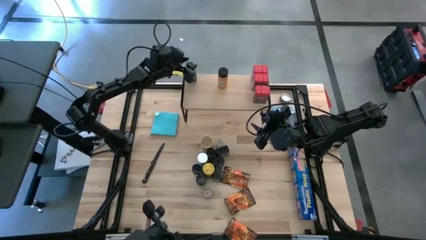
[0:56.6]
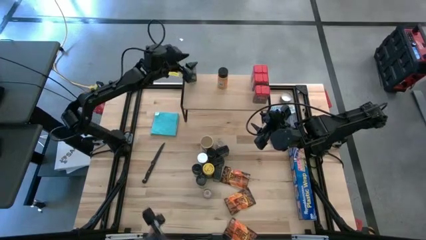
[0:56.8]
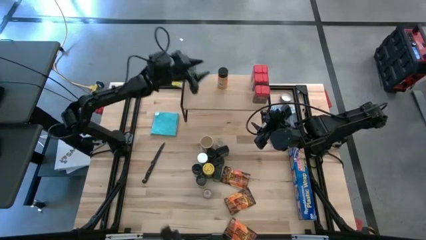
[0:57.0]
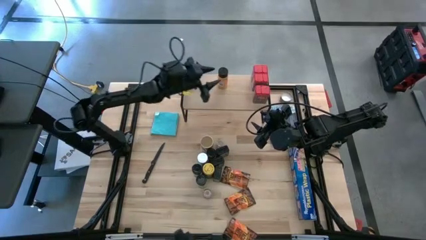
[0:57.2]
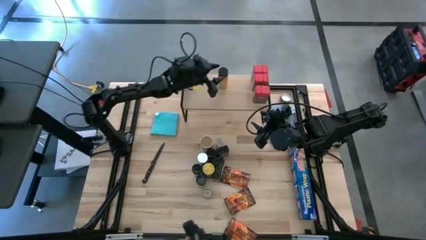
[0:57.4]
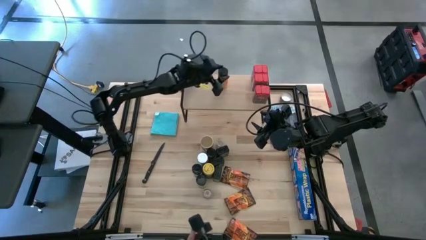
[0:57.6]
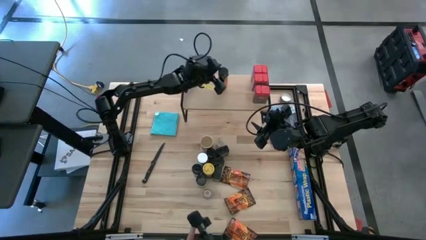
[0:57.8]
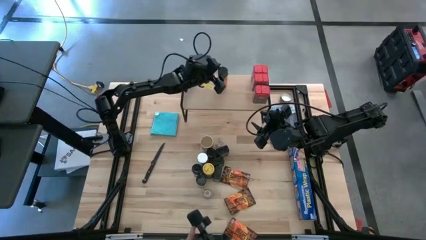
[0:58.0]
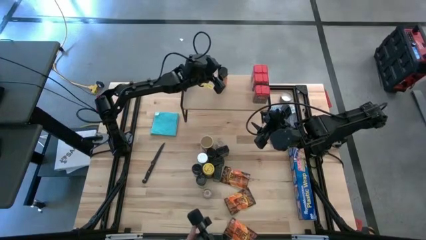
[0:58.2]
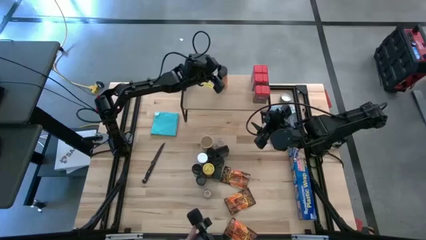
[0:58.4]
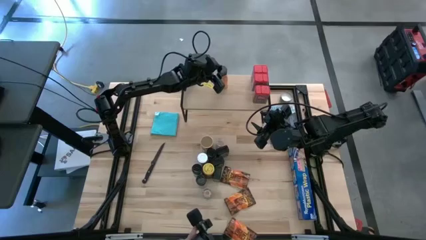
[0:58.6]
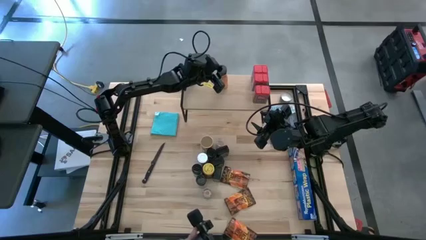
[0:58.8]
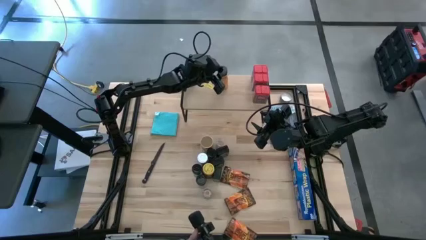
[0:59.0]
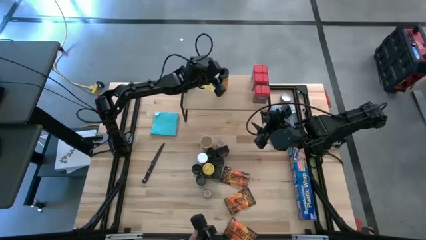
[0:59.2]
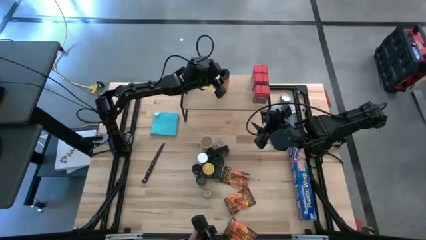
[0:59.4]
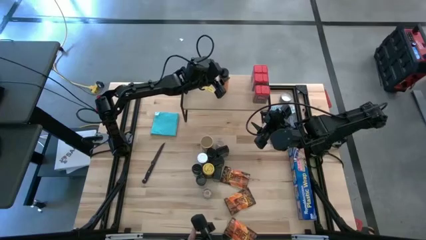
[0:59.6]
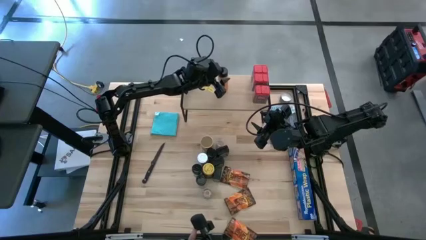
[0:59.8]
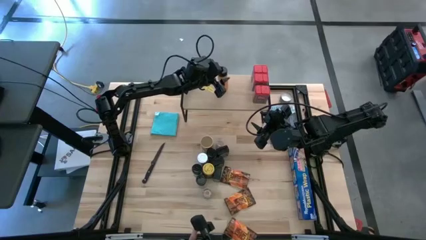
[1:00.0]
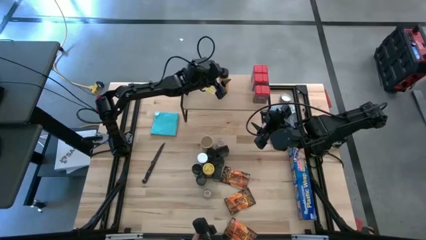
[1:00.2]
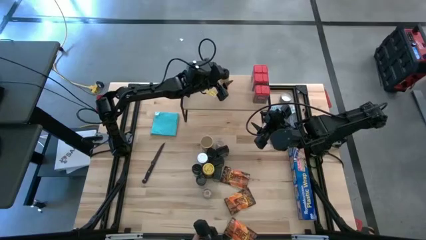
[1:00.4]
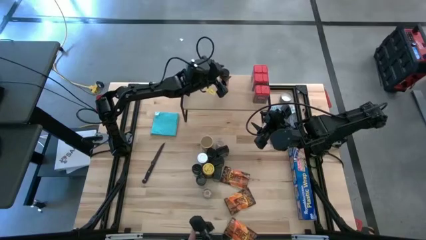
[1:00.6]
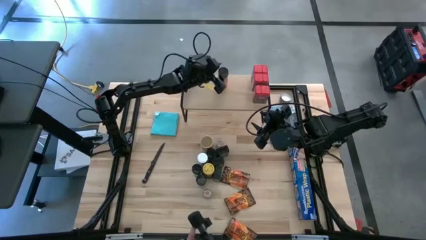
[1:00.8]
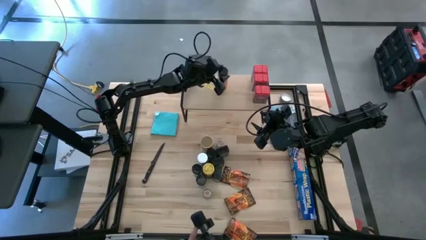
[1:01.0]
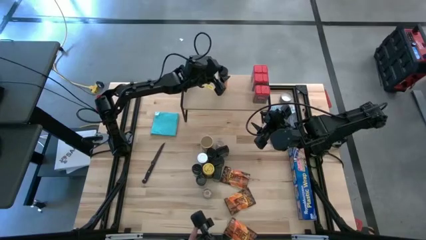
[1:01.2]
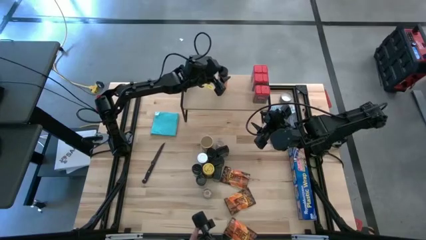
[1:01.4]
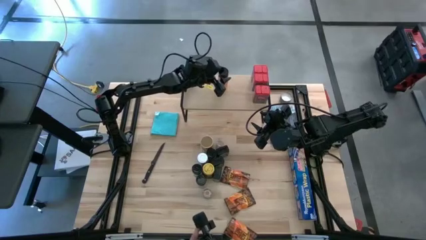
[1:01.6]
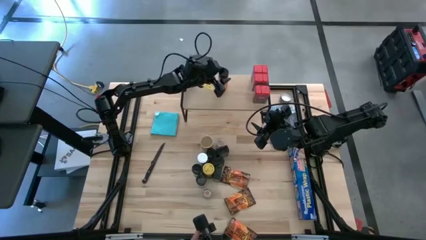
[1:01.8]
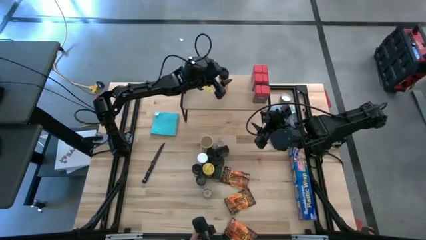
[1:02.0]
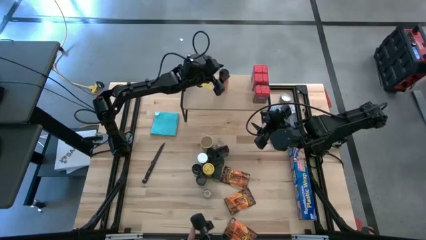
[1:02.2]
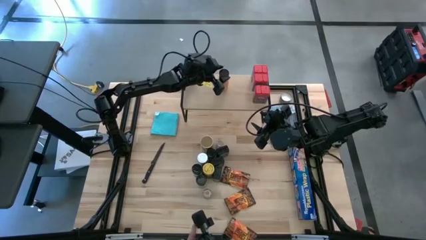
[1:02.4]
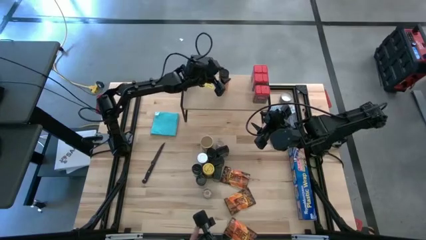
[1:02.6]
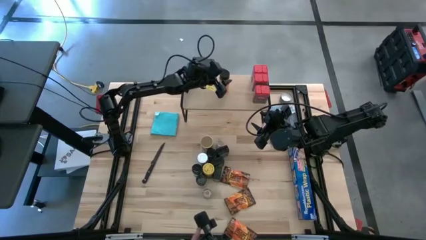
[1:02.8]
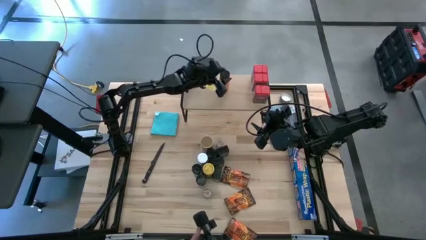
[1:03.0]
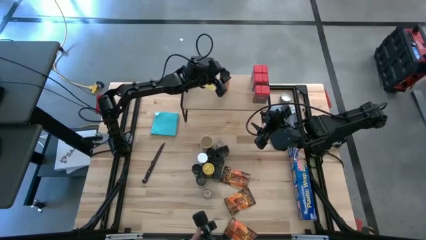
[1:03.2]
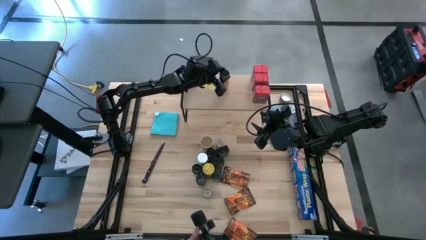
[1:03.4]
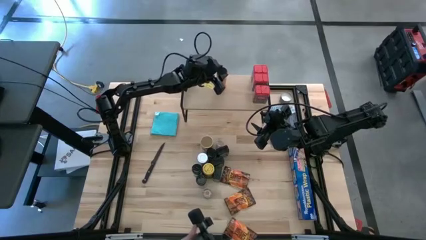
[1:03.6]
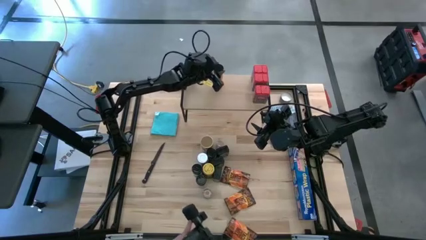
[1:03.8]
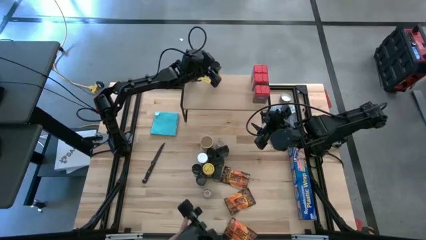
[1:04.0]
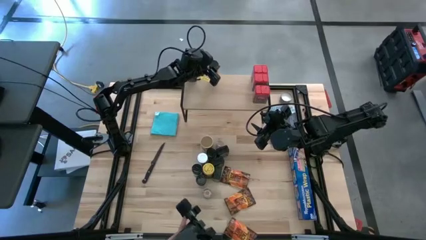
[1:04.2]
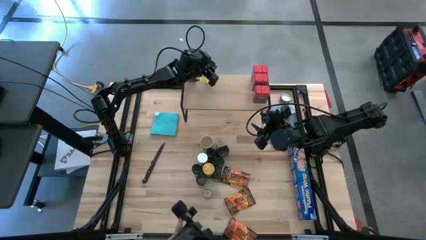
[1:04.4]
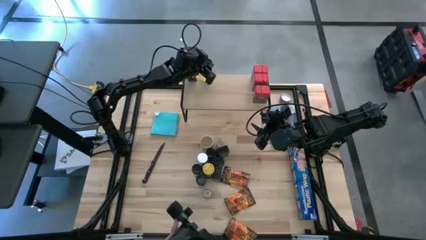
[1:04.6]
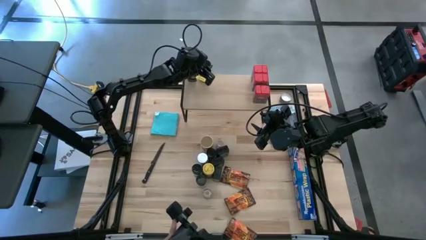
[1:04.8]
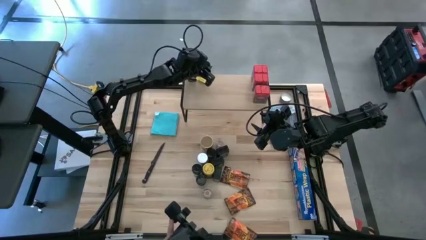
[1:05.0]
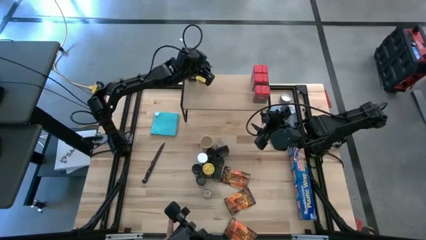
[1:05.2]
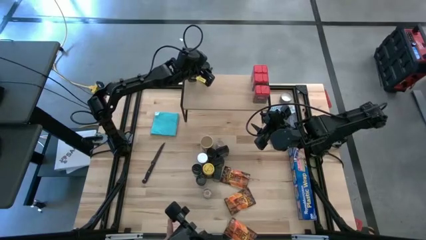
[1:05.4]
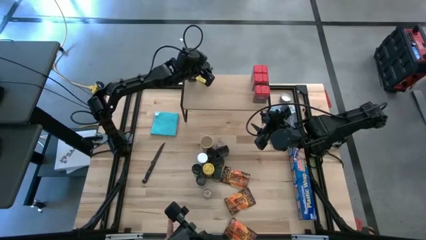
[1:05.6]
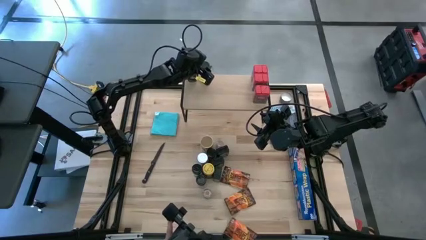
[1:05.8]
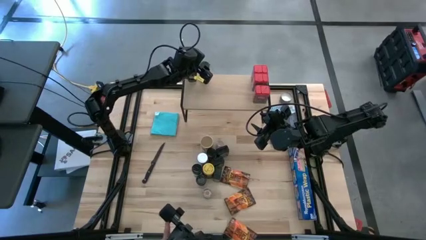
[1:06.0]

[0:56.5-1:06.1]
Task: Shelf spices
Move the black seasoning bottle to the right side of the green seasoning bottle

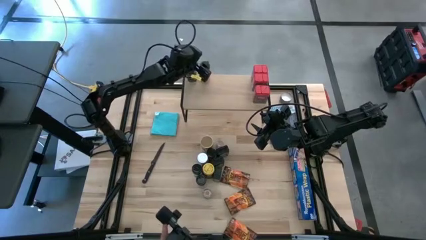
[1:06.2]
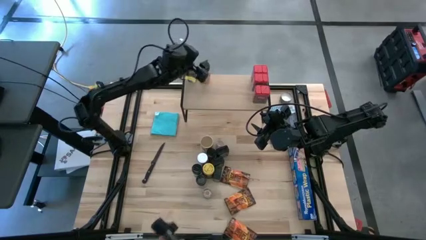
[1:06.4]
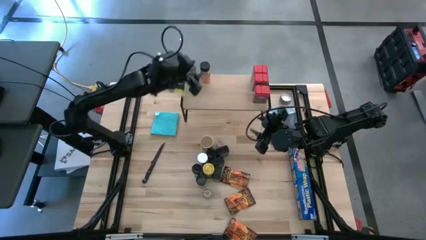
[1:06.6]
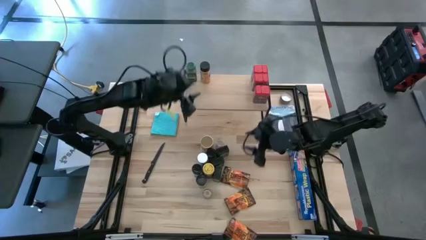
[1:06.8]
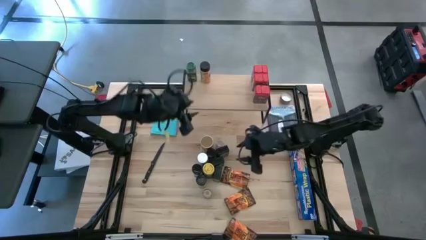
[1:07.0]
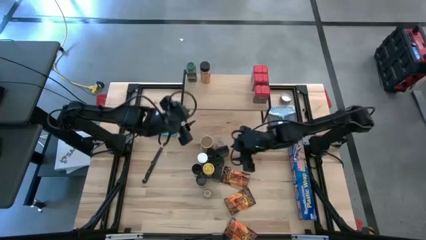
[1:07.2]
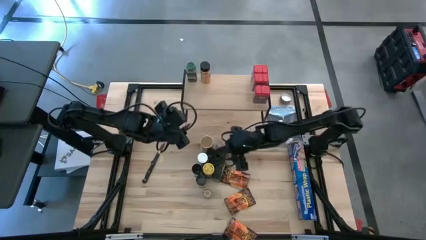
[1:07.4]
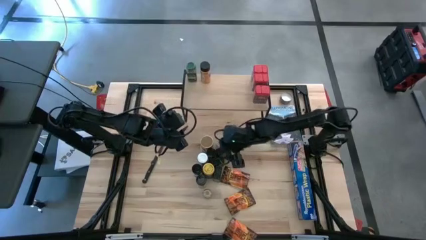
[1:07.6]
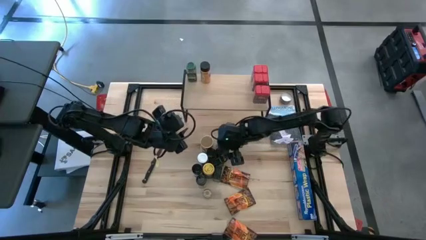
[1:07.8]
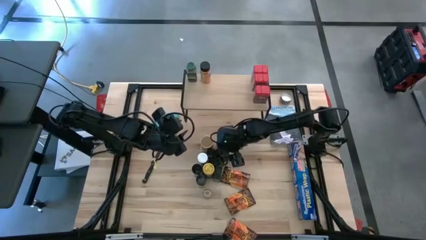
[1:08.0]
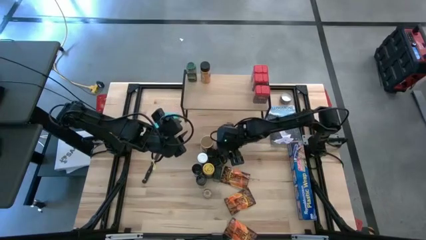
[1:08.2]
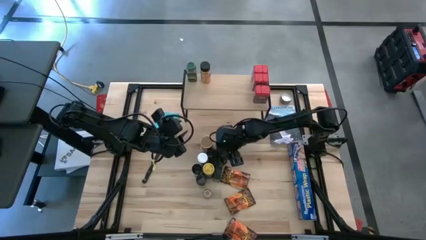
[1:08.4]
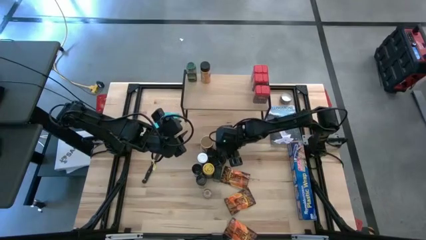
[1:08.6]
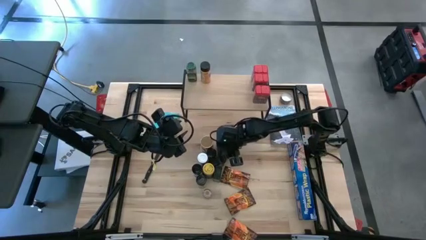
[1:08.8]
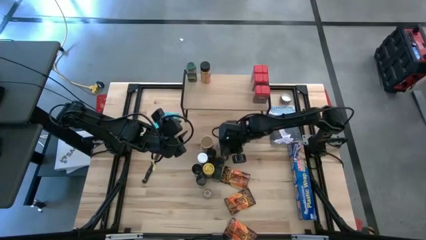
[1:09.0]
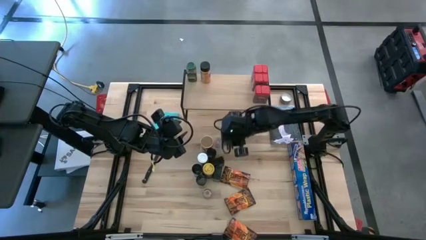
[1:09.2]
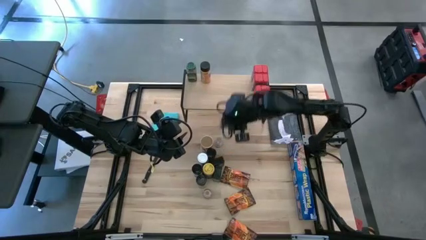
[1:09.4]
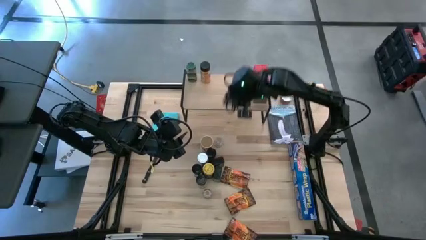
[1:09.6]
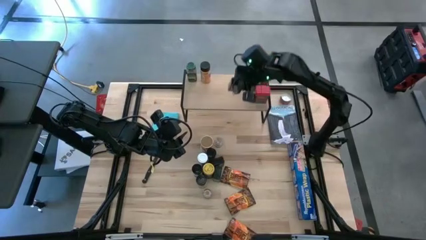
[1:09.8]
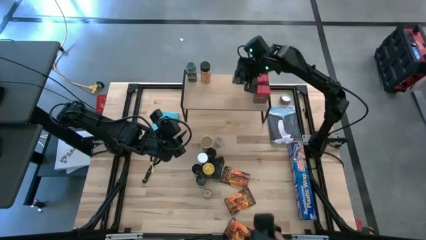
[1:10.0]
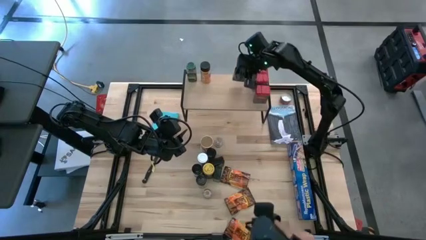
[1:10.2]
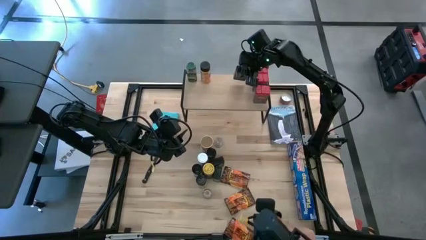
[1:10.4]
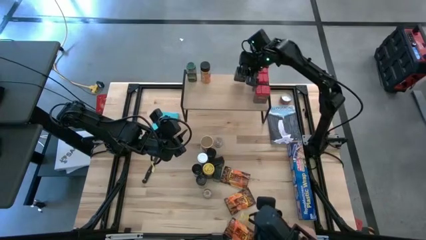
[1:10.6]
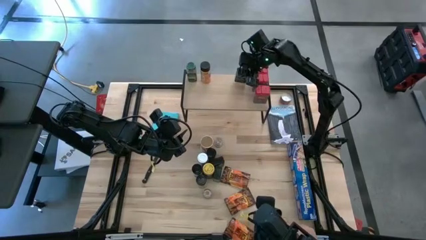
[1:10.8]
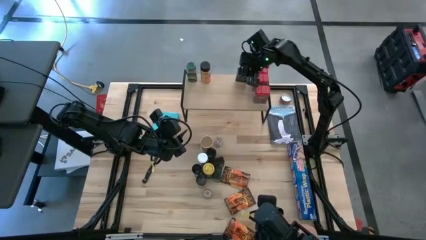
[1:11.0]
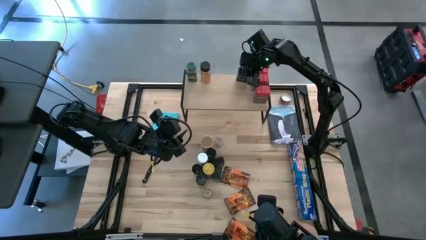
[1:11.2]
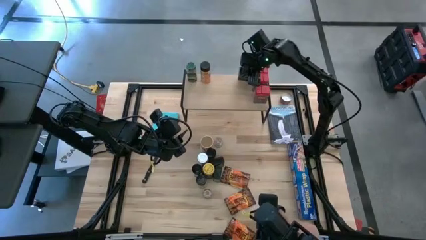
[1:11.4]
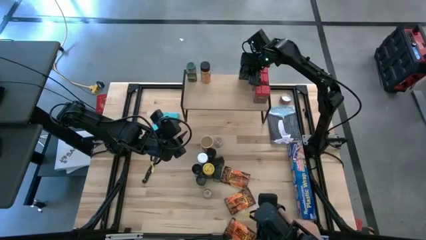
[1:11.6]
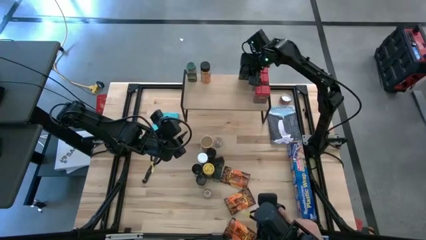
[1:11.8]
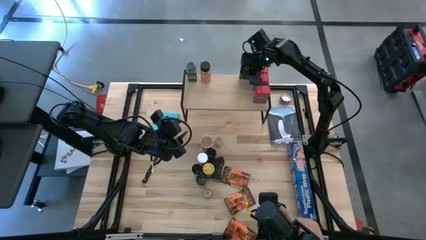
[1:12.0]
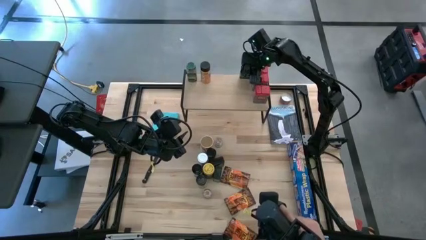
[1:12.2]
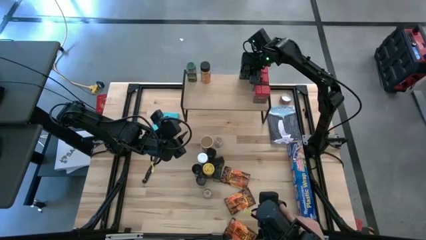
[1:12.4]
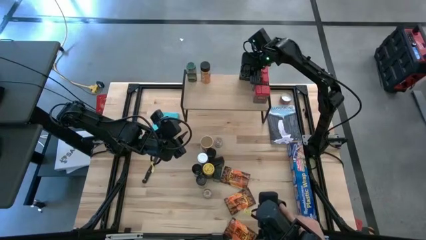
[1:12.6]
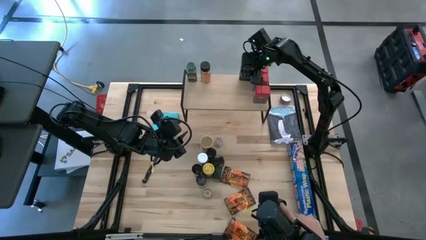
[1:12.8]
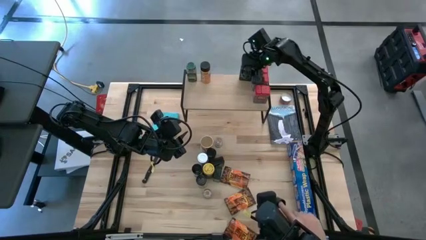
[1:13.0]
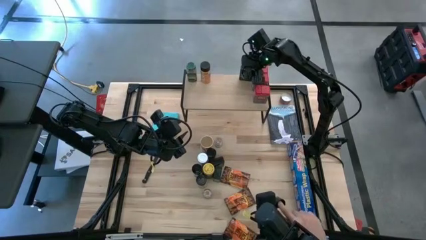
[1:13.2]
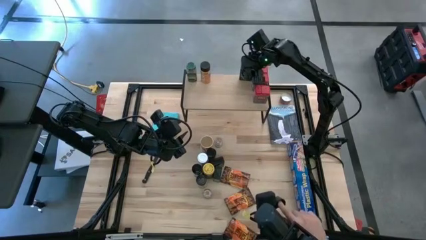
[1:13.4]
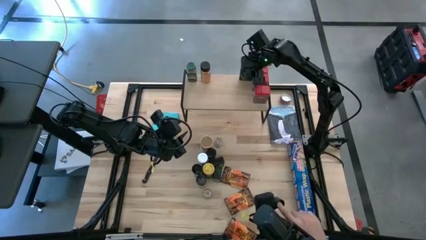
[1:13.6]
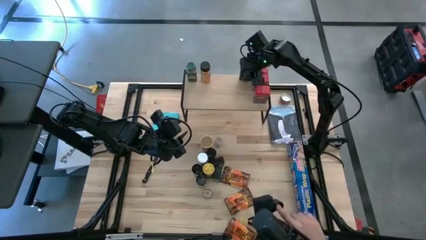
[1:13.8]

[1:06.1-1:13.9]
Put the black seasoning can on the shelf
